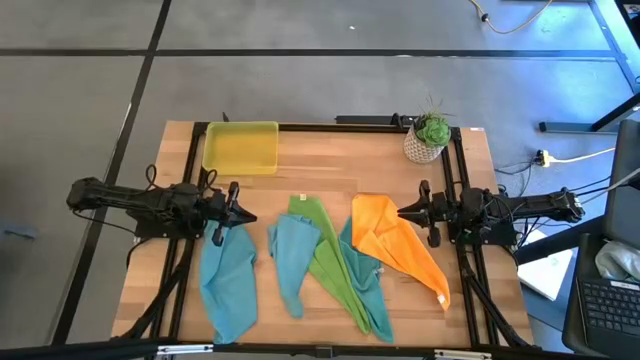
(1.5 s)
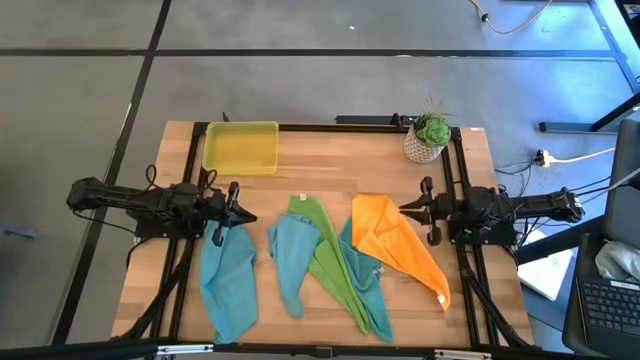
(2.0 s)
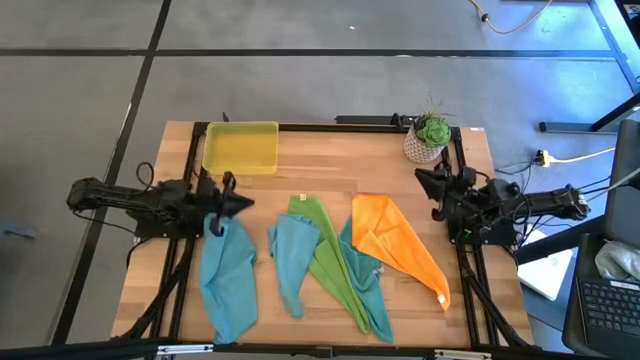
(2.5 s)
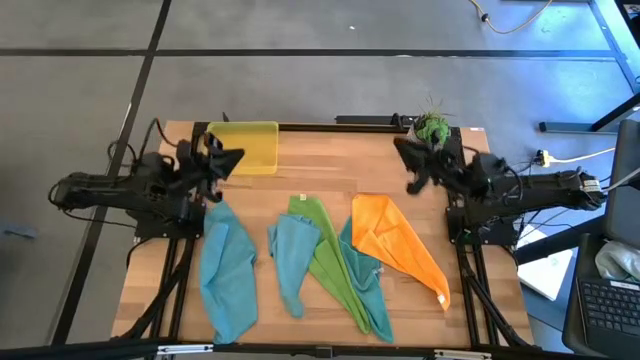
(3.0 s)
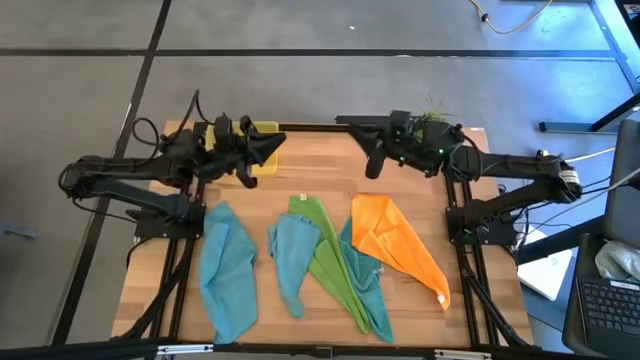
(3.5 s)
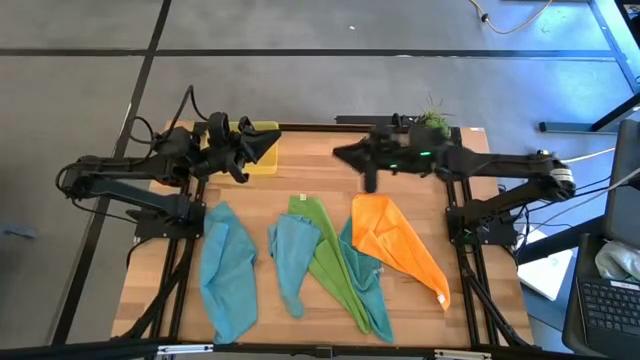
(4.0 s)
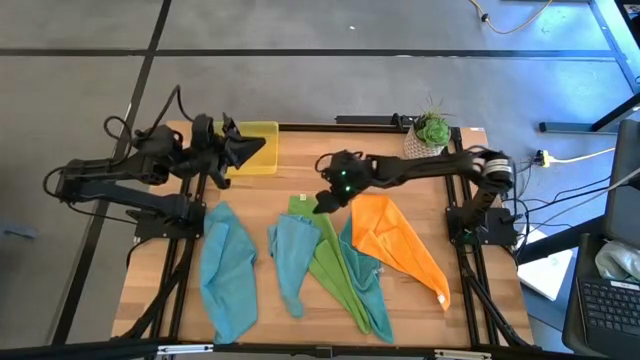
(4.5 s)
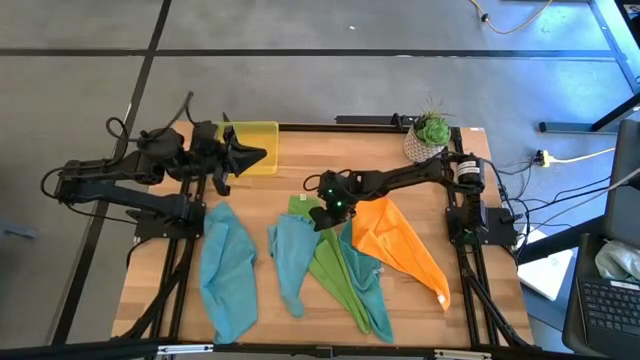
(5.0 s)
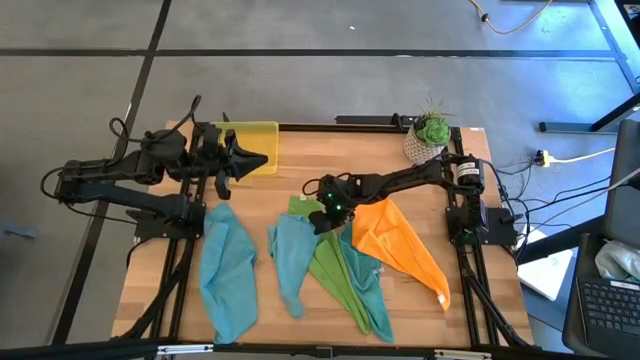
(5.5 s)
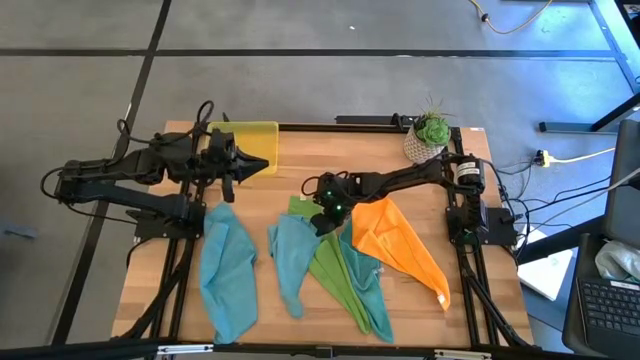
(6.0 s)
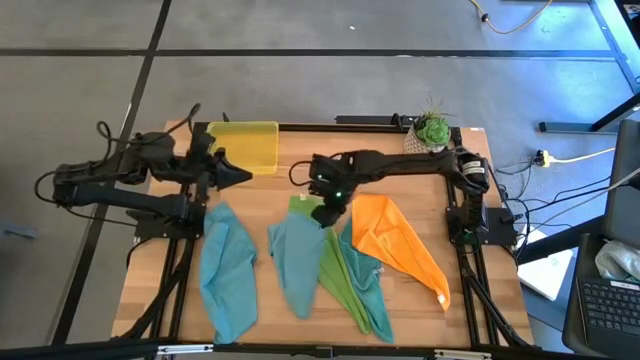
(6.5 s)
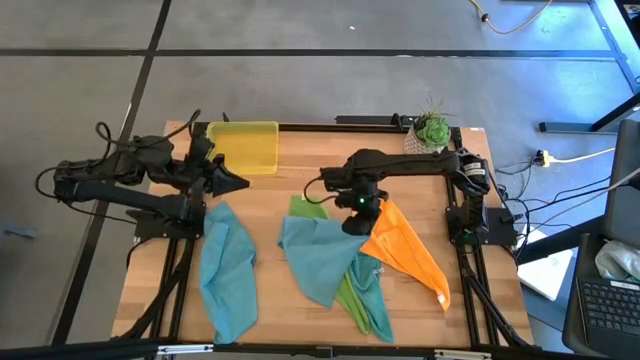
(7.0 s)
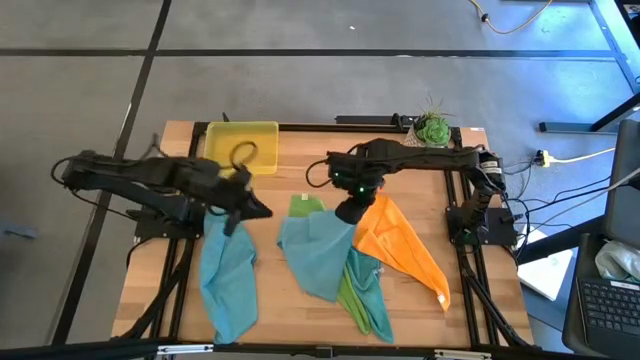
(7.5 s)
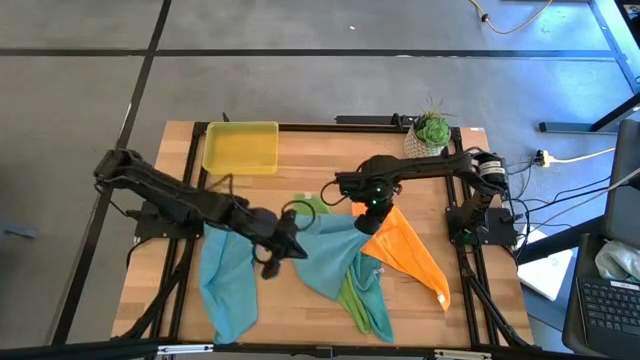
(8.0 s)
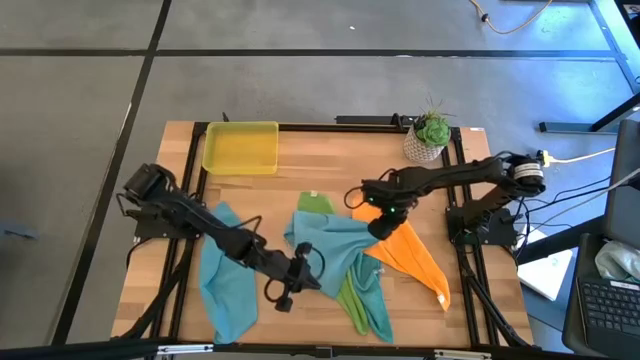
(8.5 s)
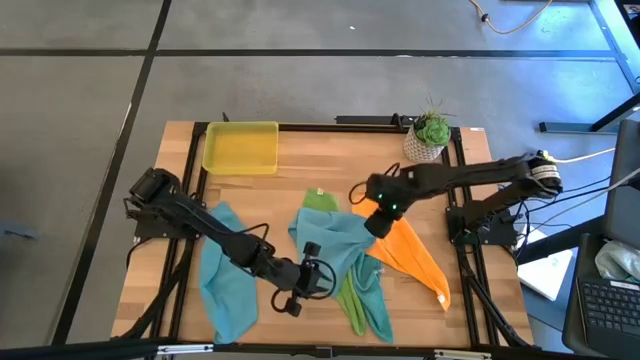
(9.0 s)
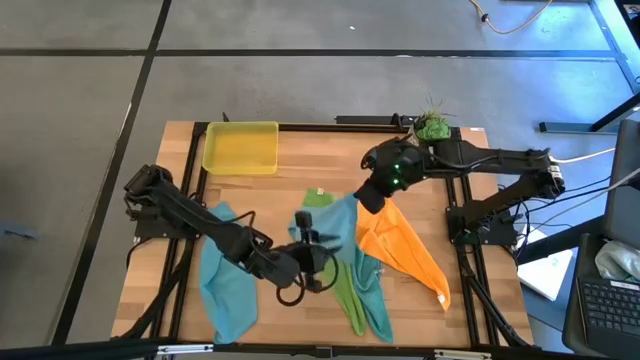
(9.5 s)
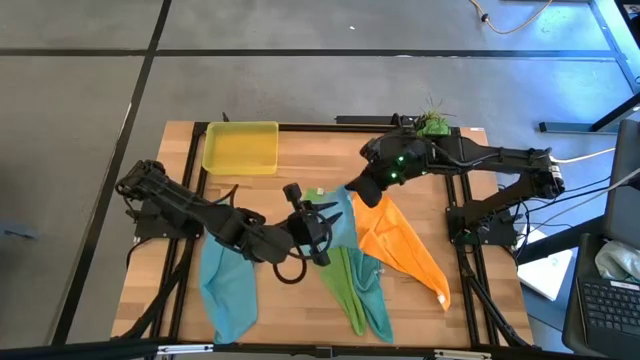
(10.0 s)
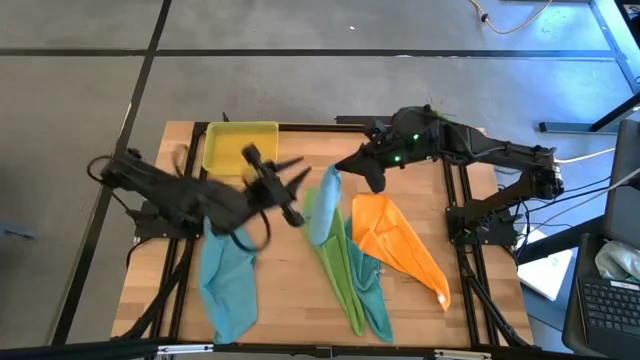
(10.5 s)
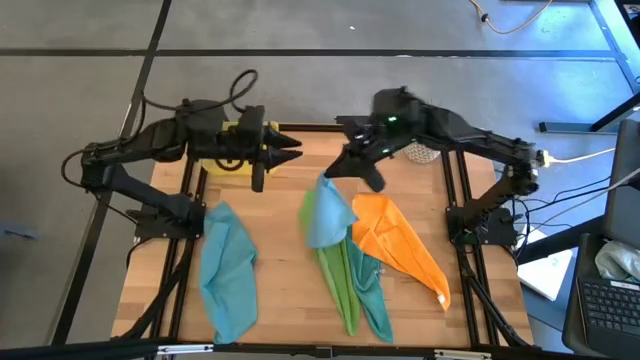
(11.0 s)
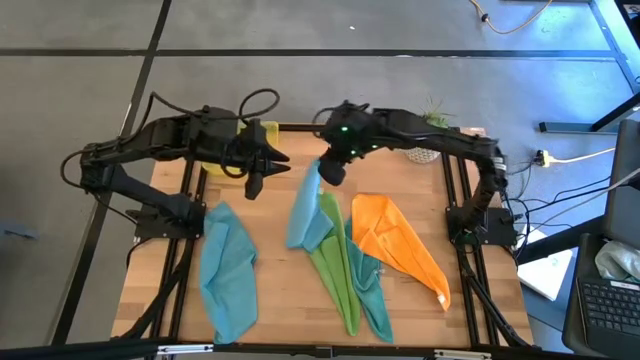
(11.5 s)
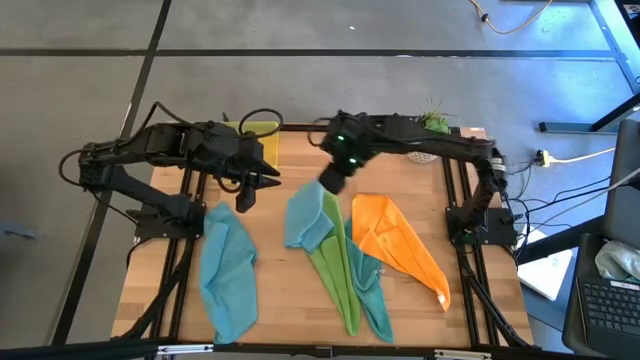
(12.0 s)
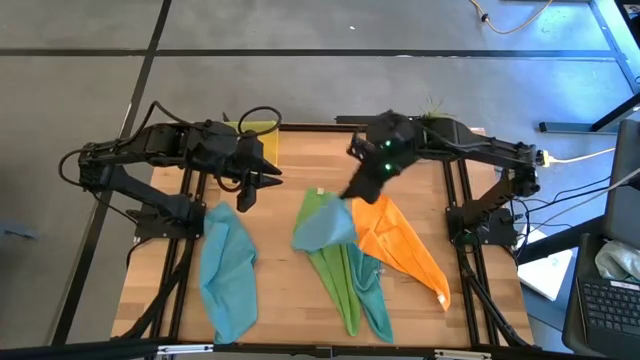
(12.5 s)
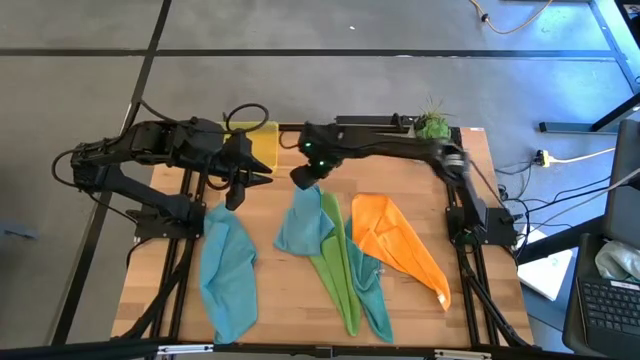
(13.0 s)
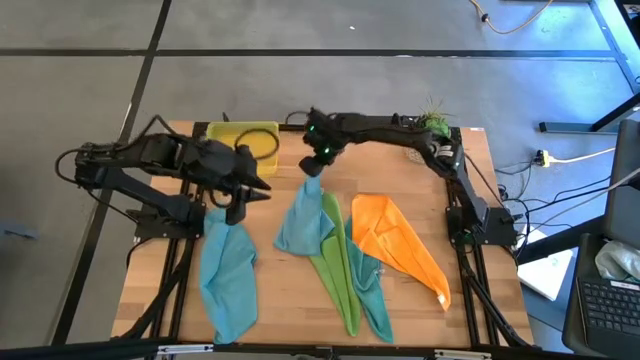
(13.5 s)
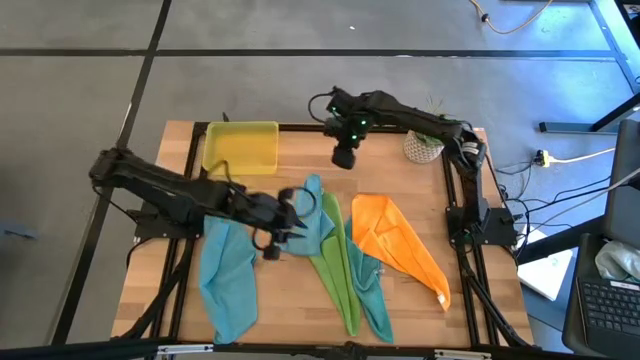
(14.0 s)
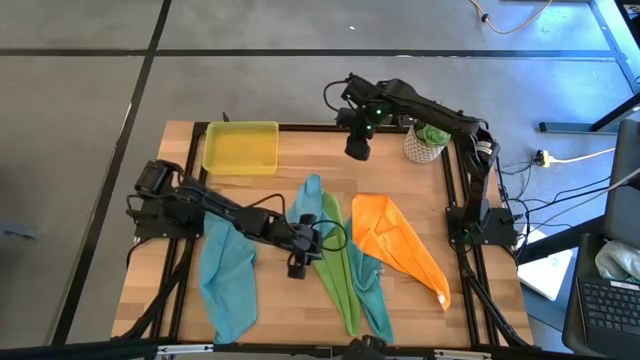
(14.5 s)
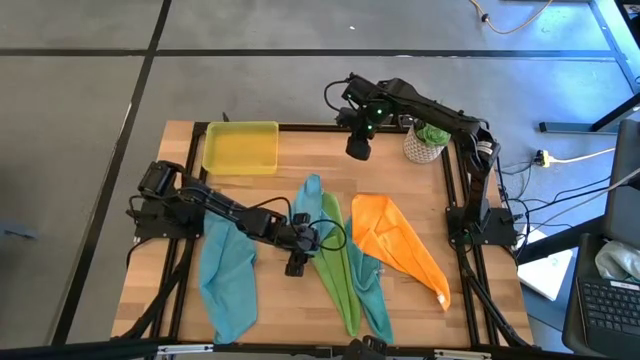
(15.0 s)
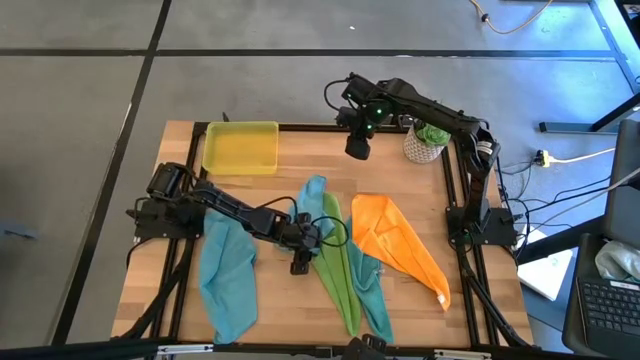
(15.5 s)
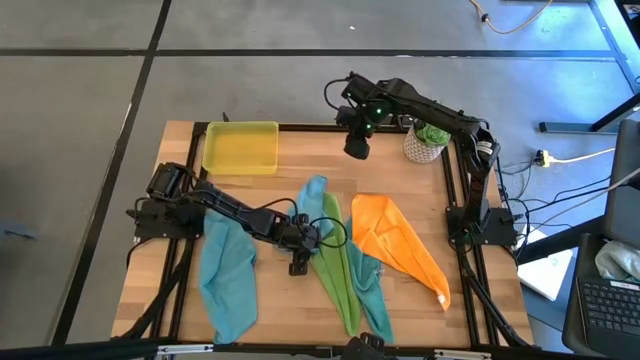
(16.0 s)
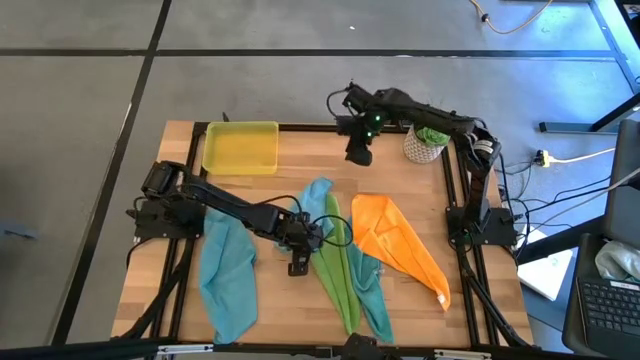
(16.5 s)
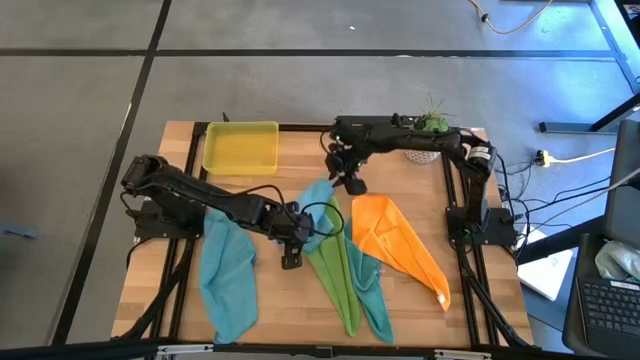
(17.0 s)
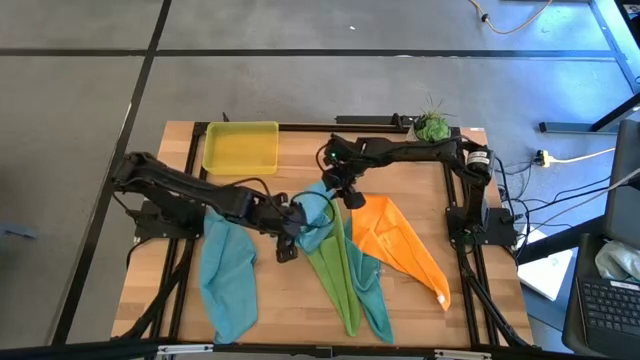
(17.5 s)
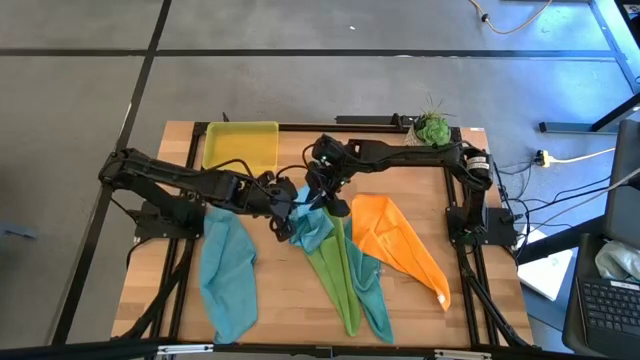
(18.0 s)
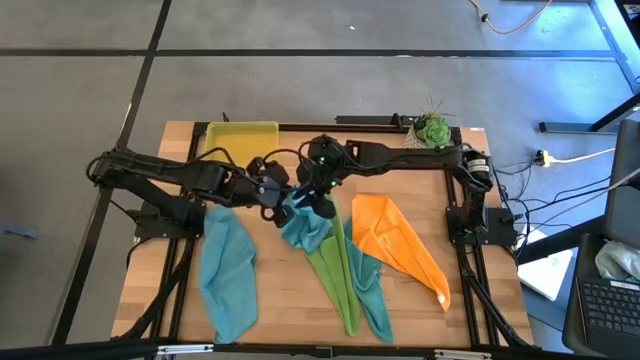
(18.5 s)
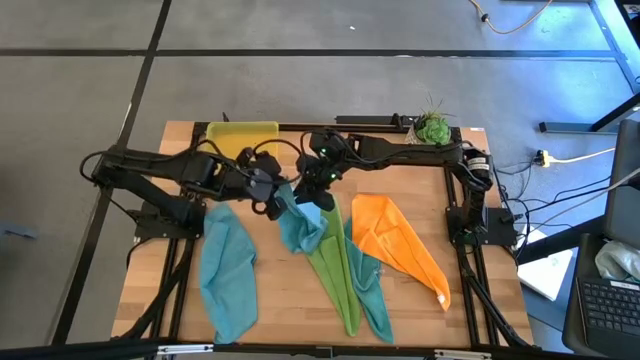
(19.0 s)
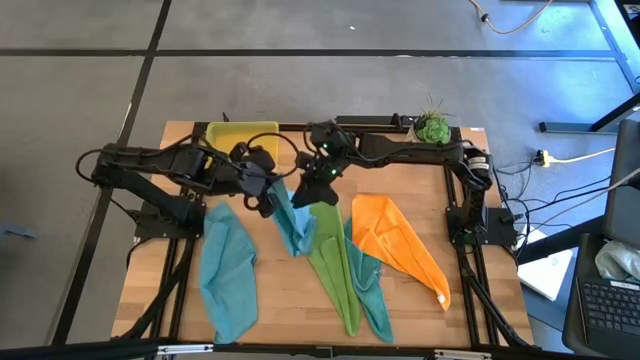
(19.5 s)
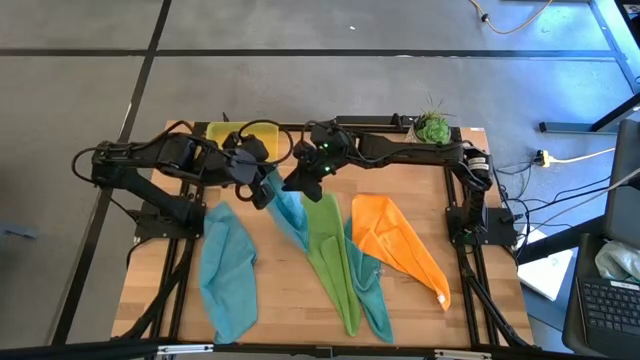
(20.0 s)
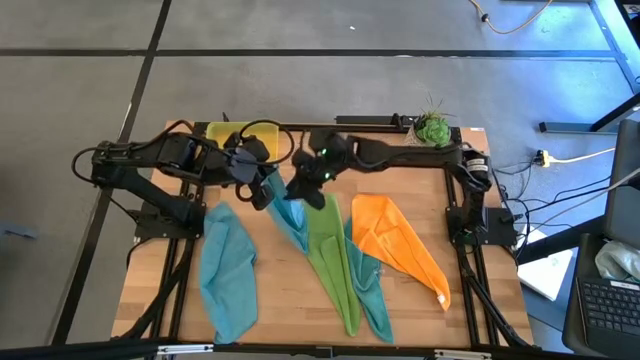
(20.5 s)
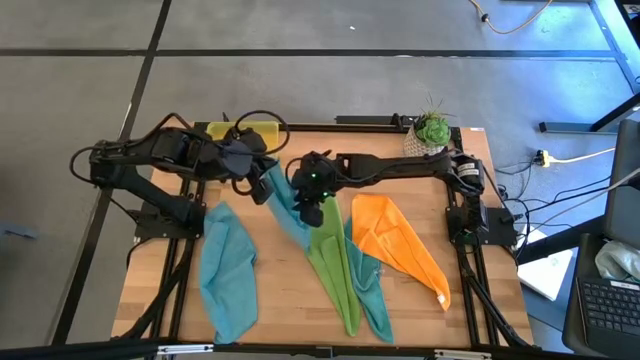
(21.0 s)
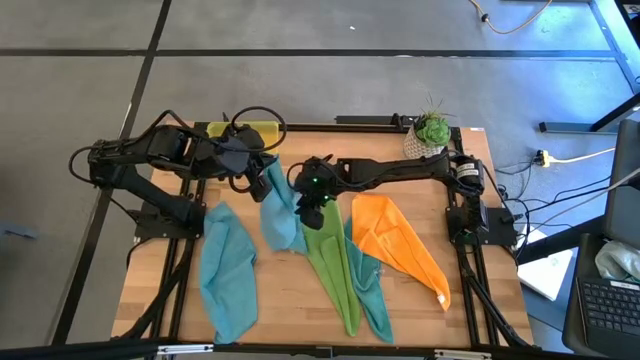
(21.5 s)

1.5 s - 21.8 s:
Task: Fold microfiber towels
Fold the center blue towel
